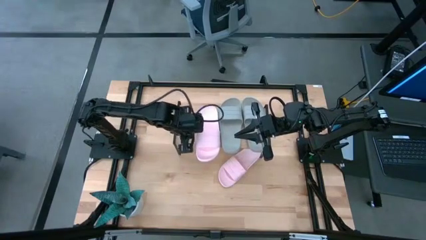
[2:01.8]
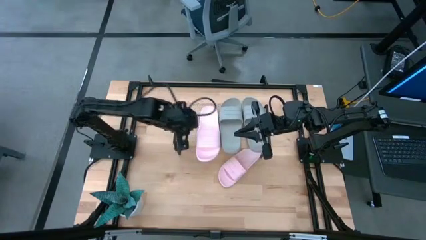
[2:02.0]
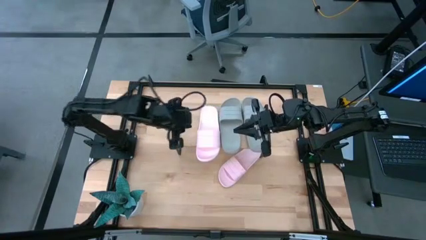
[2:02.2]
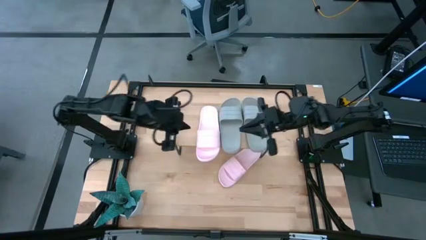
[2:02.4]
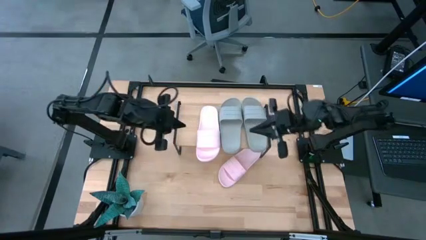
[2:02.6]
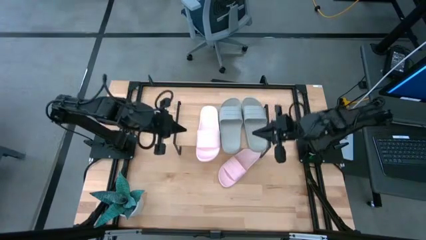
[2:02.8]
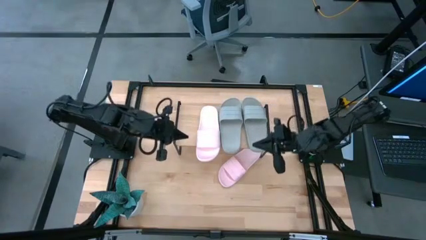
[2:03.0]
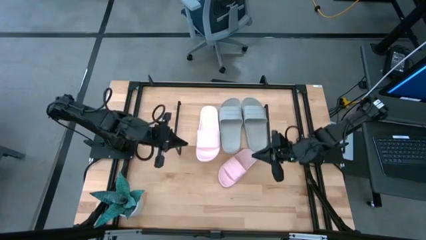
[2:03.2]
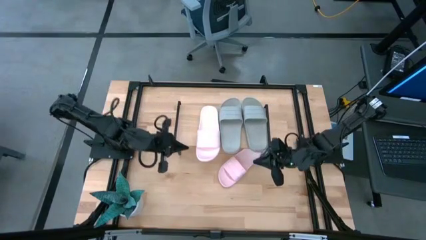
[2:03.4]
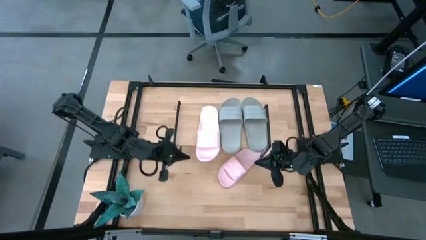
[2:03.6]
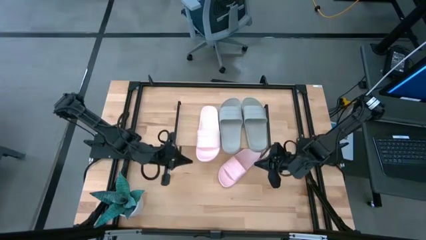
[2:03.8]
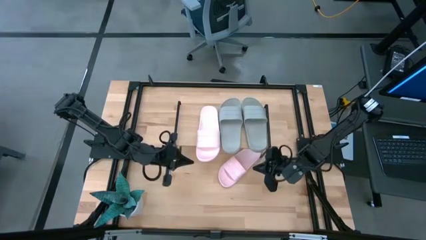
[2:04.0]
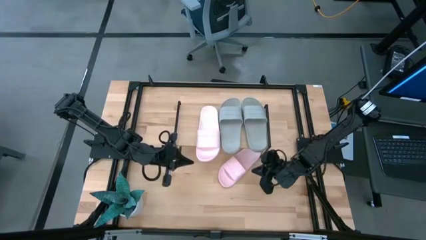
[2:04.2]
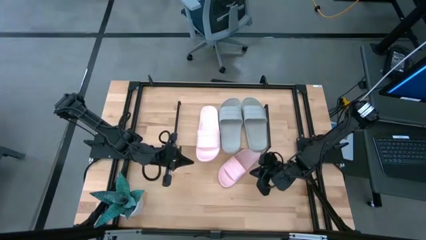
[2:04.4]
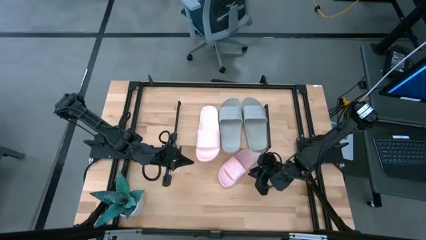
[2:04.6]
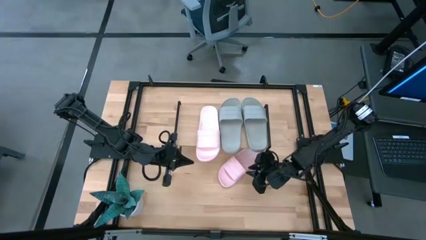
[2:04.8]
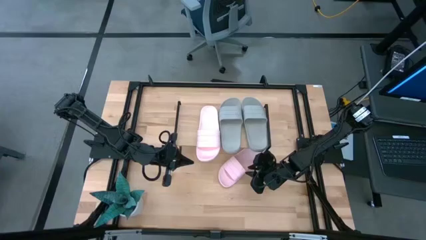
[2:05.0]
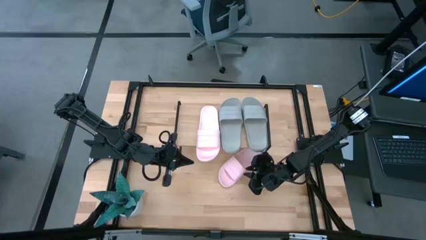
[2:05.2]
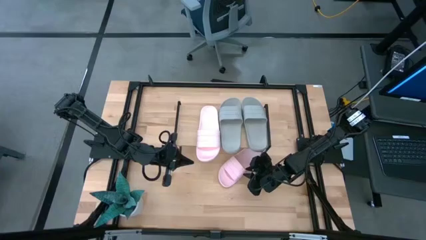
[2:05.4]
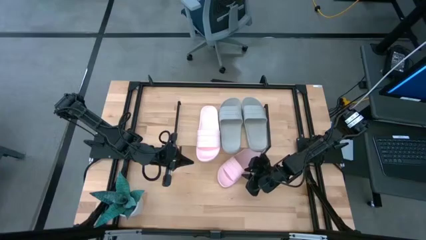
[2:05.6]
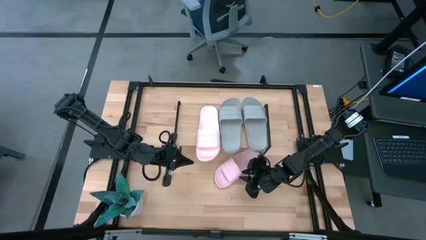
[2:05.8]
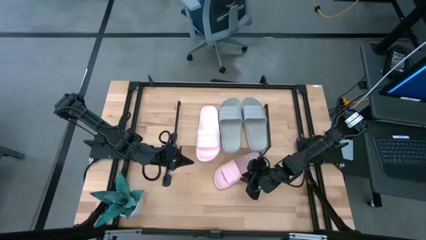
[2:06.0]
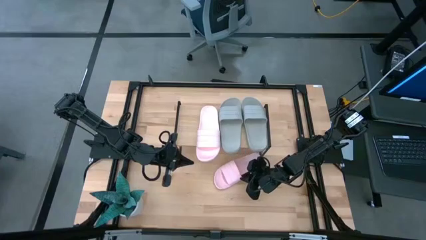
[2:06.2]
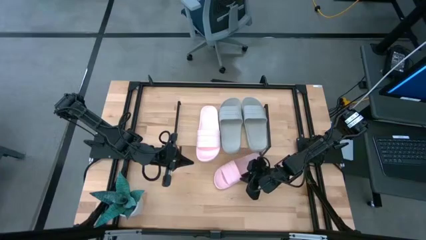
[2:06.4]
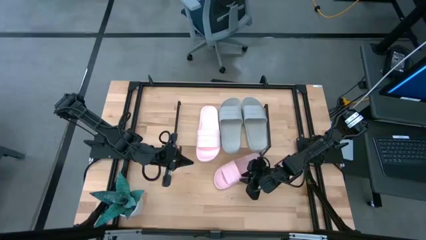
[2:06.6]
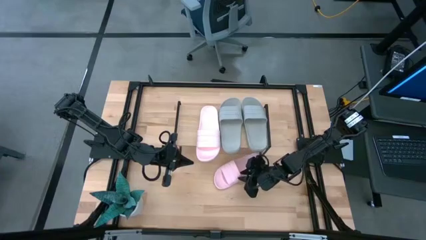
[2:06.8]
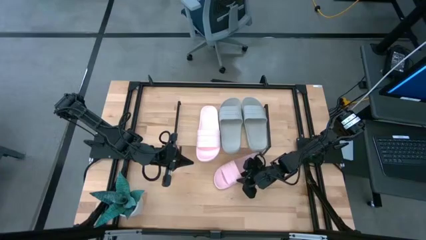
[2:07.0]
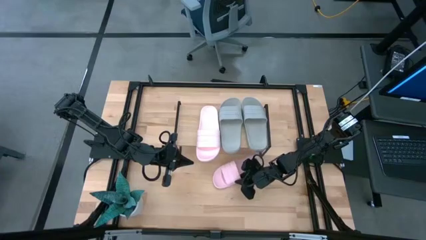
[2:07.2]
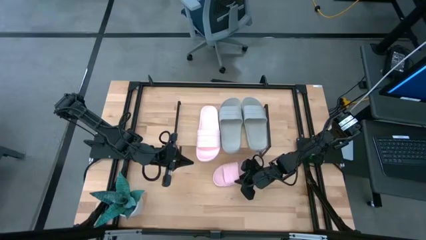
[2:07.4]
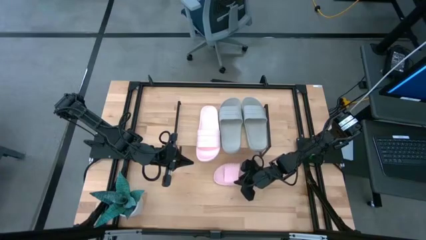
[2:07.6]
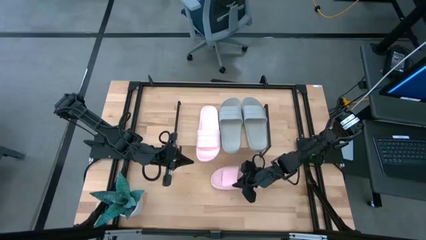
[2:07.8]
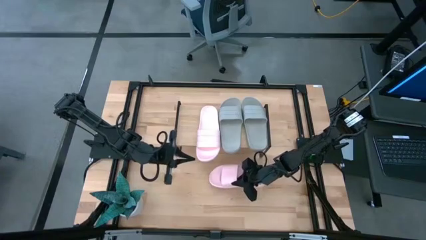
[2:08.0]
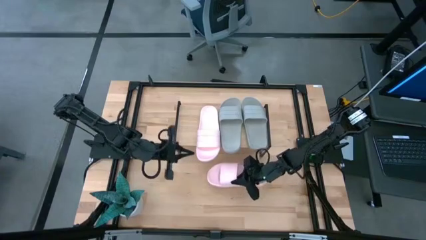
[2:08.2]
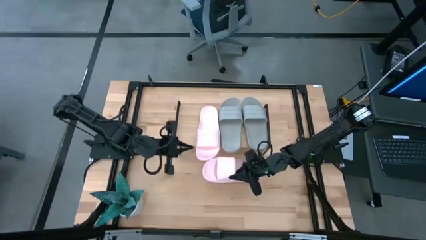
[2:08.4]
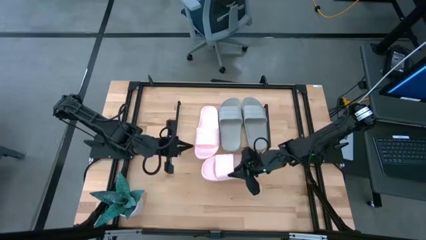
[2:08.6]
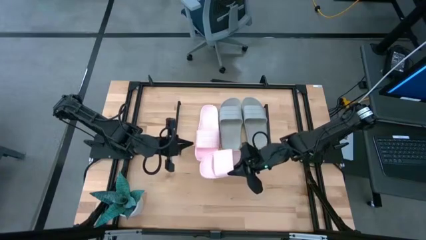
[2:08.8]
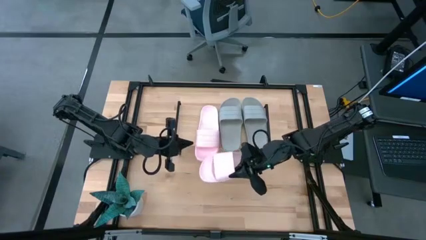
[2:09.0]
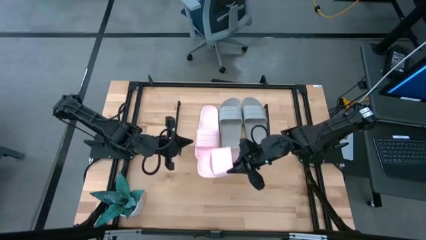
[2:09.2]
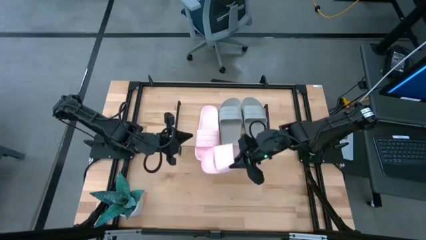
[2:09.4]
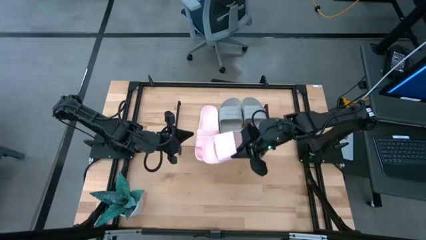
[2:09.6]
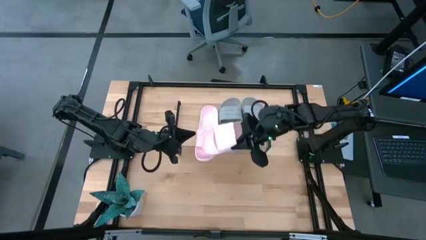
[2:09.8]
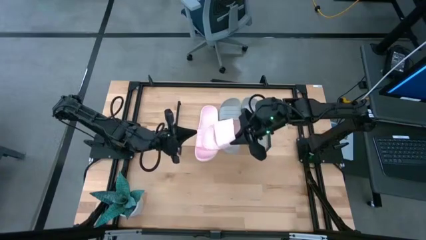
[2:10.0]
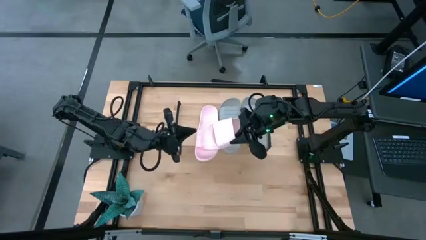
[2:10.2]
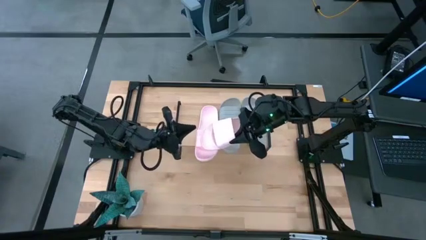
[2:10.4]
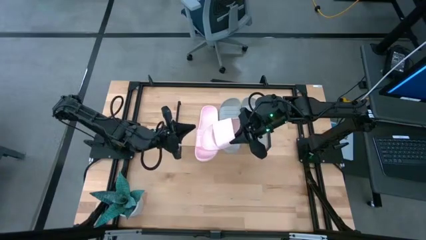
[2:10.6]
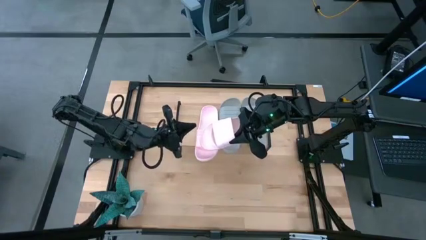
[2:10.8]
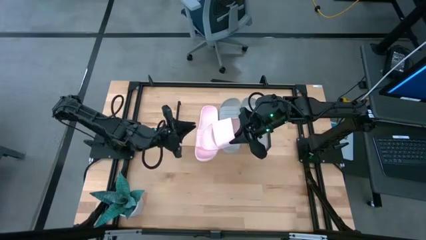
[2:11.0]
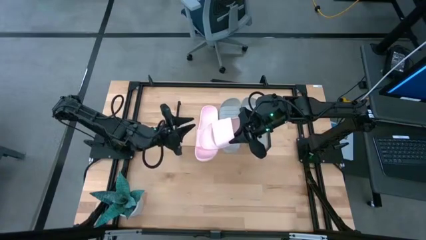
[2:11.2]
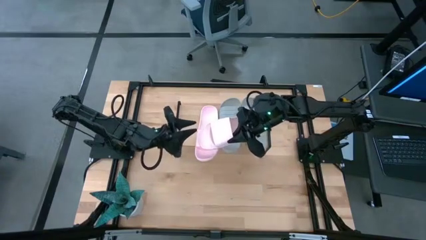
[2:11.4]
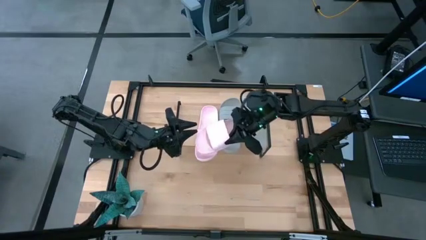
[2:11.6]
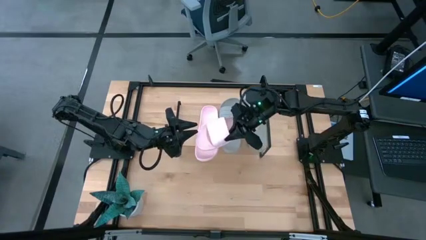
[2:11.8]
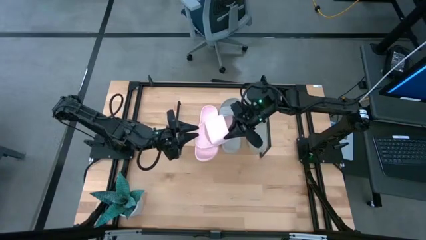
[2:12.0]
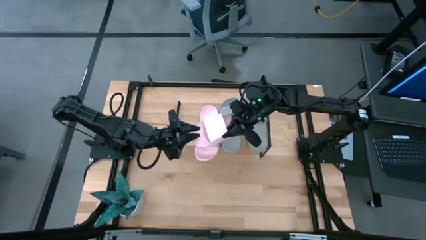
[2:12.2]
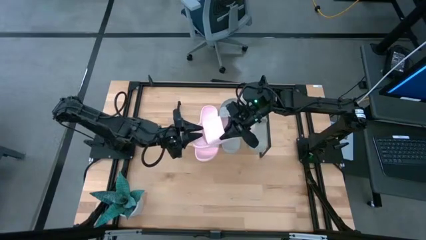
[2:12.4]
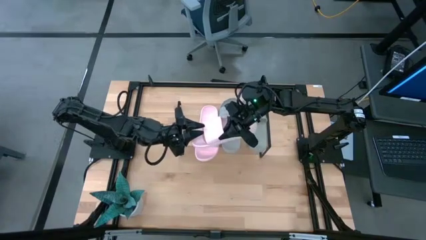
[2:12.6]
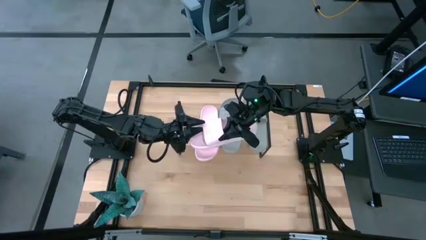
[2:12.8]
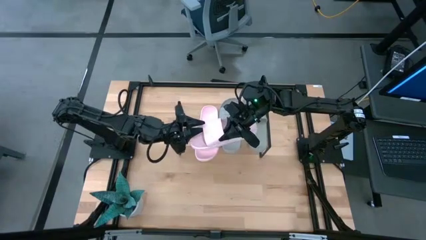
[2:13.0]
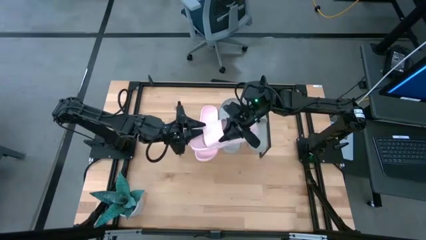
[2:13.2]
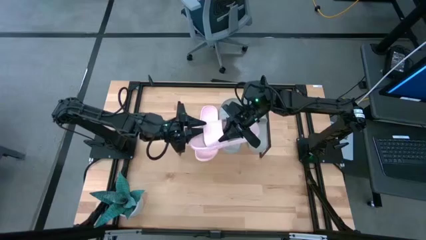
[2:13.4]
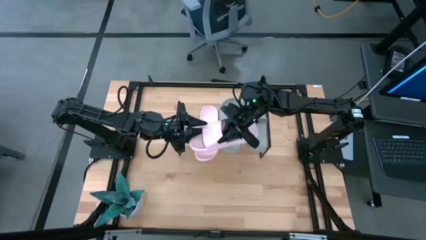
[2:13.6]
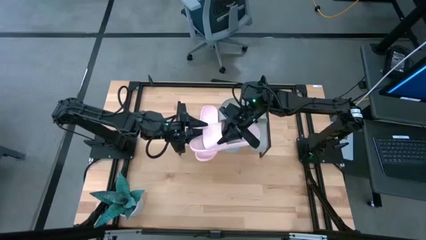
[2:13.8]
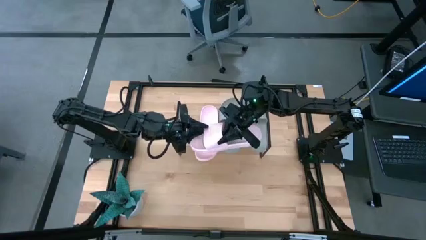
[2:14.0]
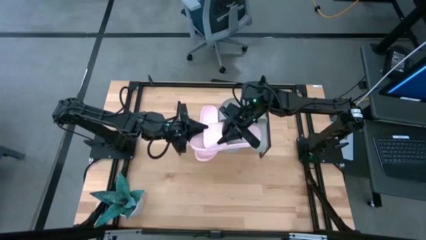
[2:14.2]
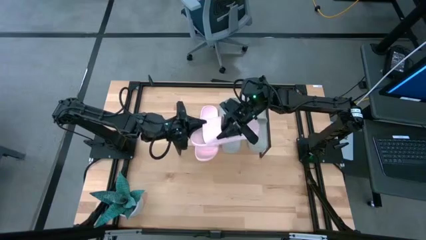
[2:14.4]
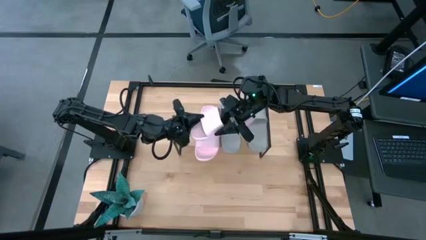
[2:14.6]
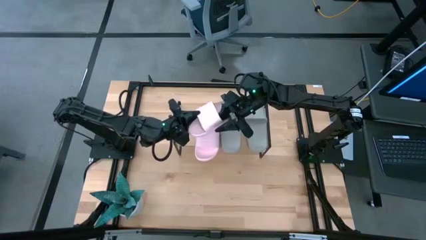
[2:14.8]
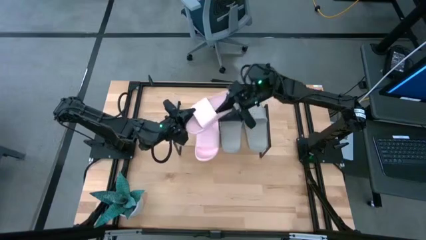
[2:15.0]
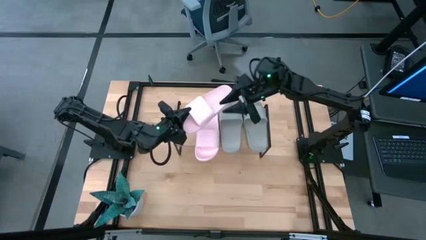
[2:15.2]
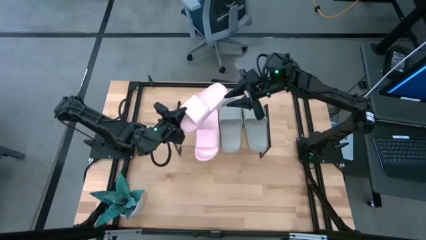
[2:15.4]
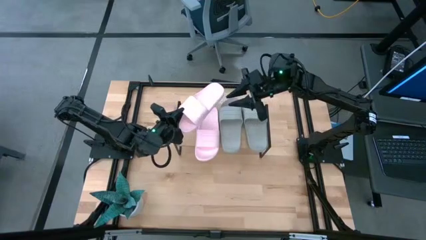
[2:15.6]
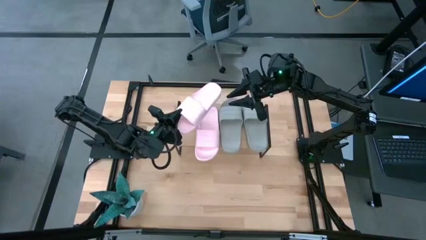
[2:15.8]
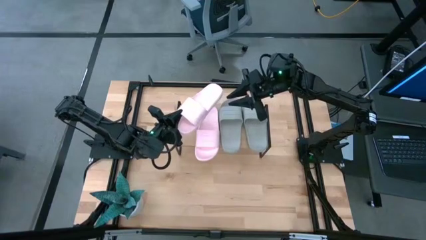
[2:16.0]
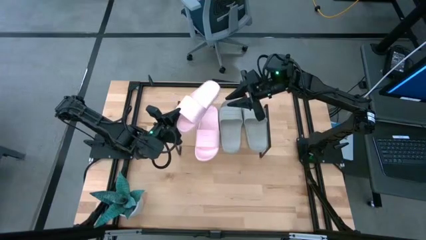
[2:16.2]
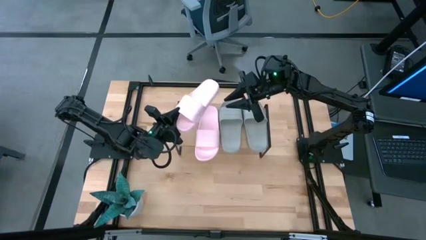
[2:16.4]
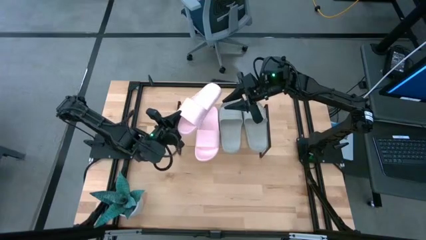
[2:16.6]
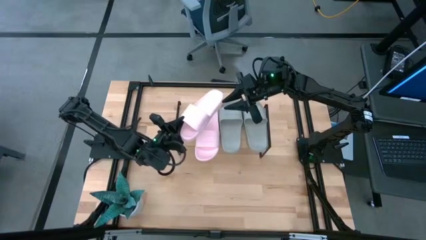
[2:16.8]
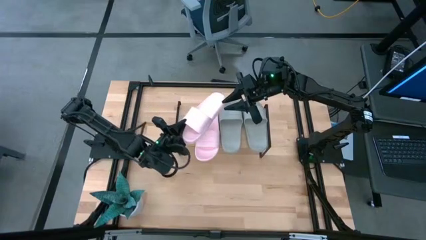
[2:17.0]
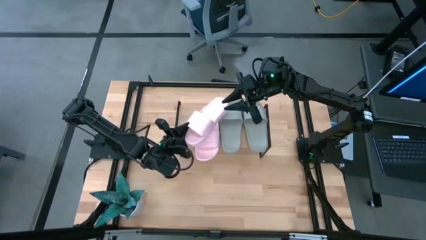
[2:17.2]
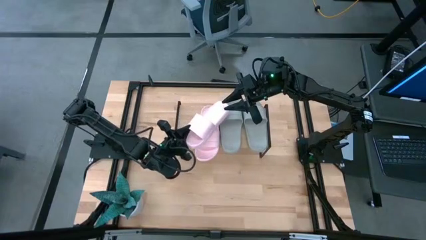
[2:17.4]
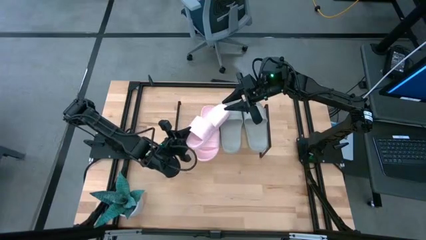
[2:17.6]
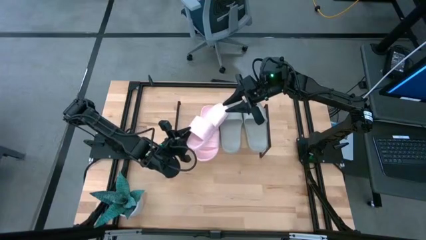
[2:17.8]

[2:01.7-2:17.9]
Task: Pick and place slides into the shelf
Put the pink slide on the shelf
